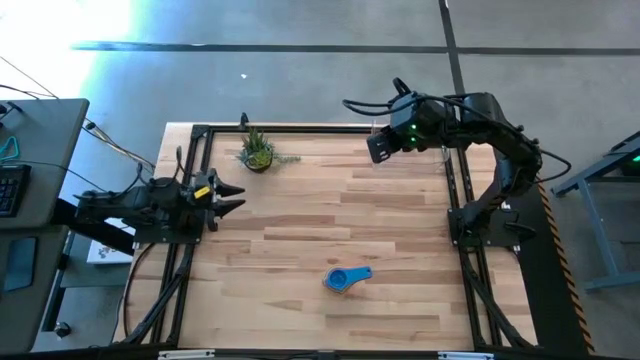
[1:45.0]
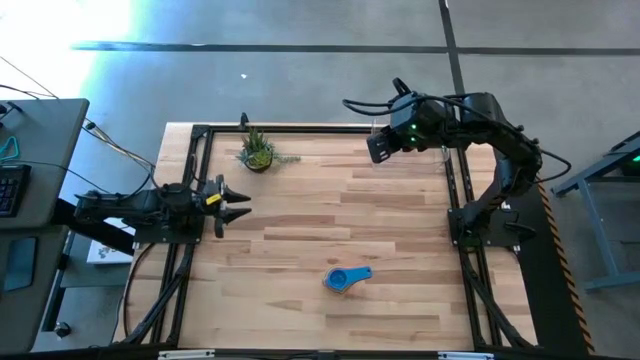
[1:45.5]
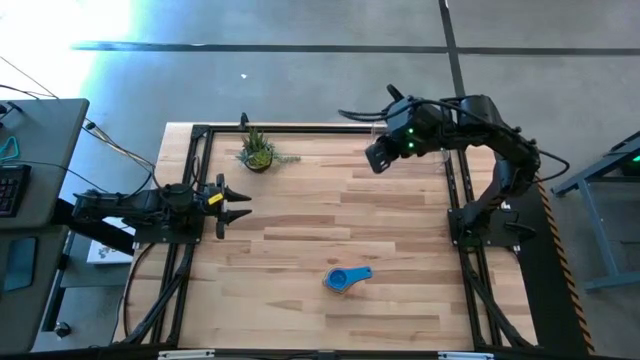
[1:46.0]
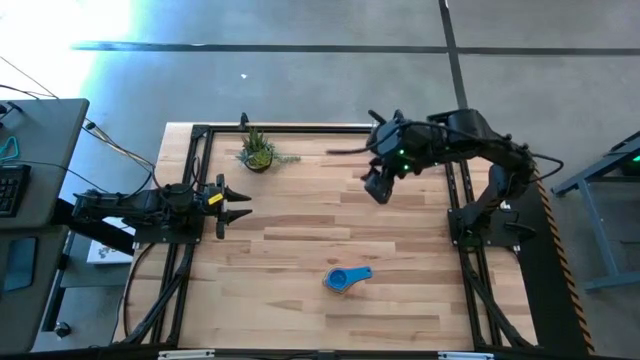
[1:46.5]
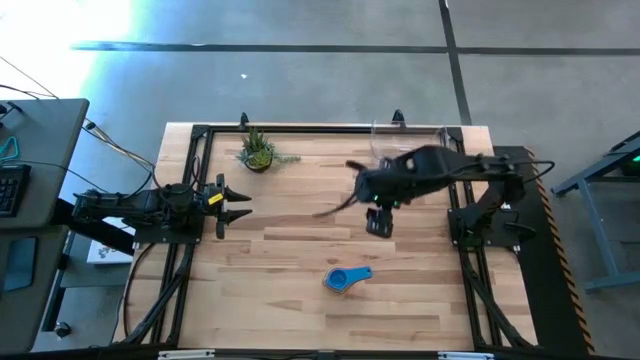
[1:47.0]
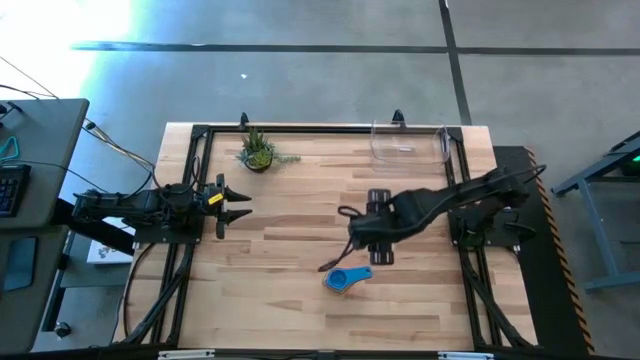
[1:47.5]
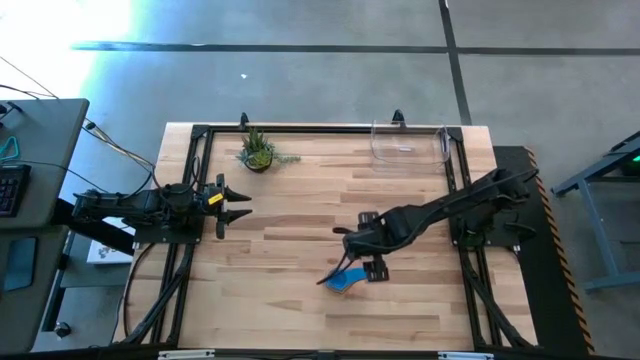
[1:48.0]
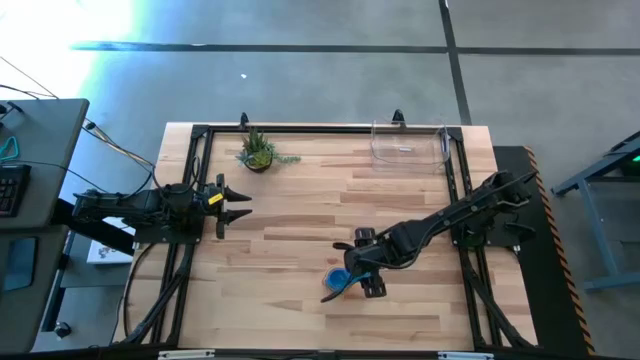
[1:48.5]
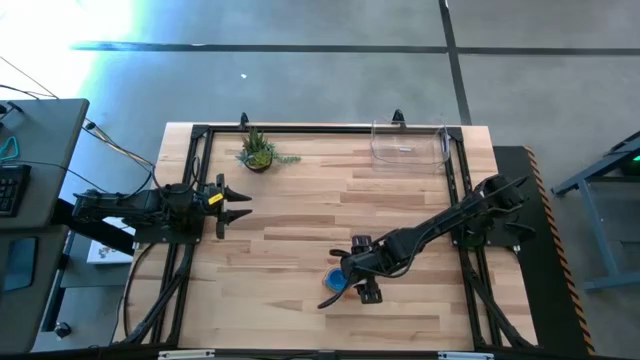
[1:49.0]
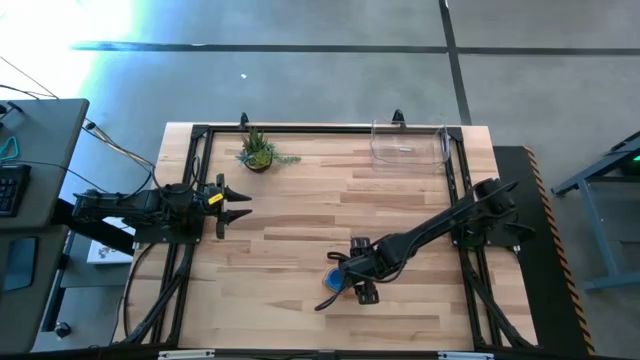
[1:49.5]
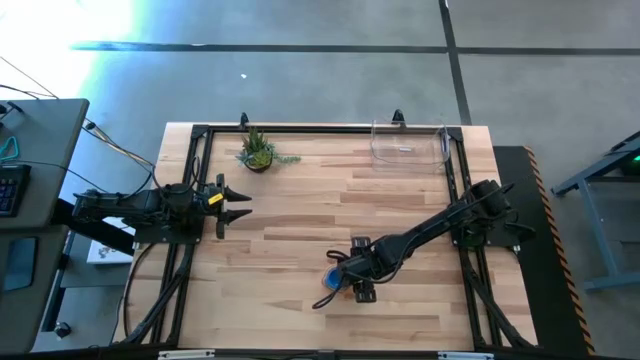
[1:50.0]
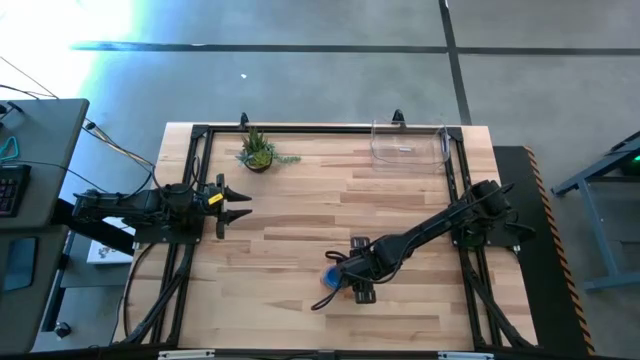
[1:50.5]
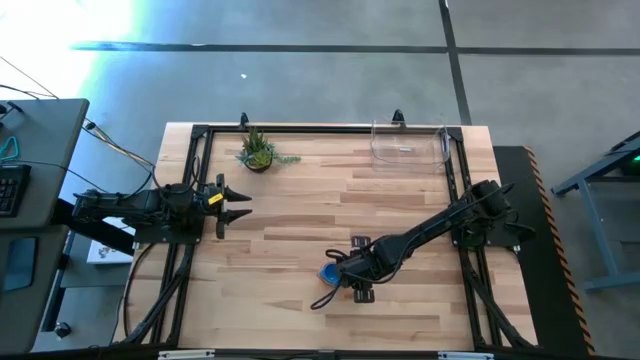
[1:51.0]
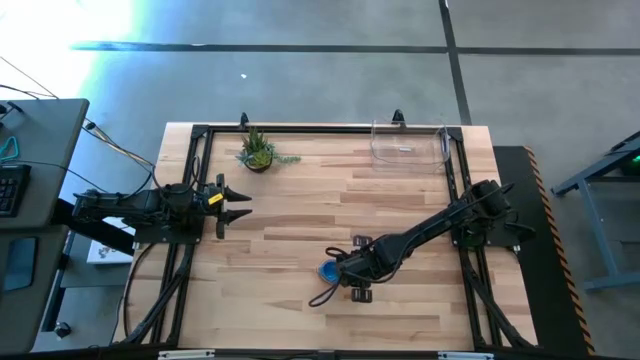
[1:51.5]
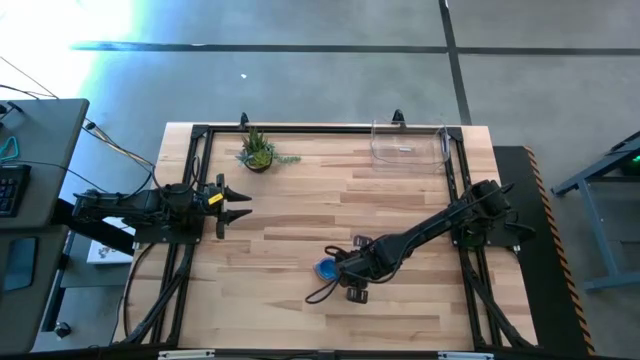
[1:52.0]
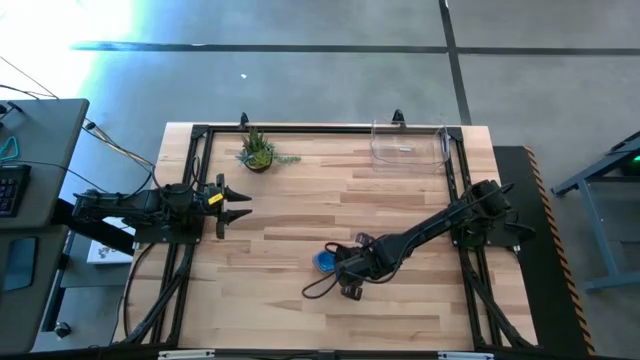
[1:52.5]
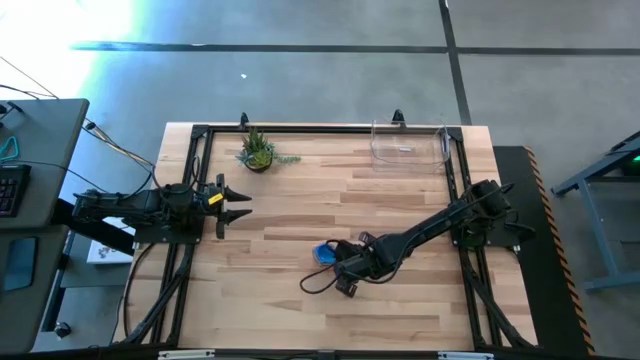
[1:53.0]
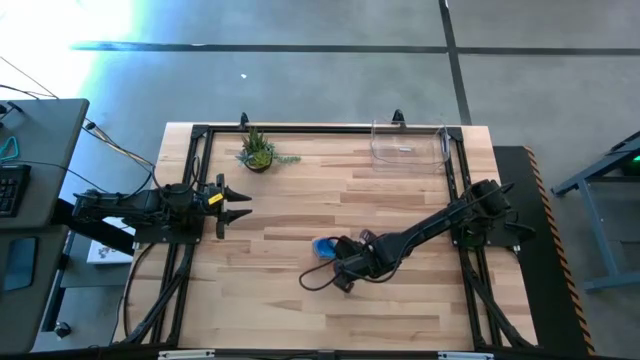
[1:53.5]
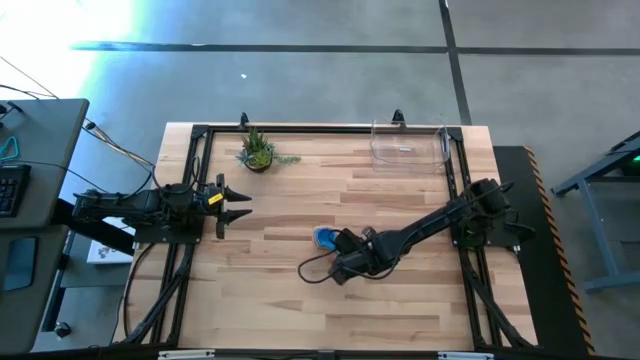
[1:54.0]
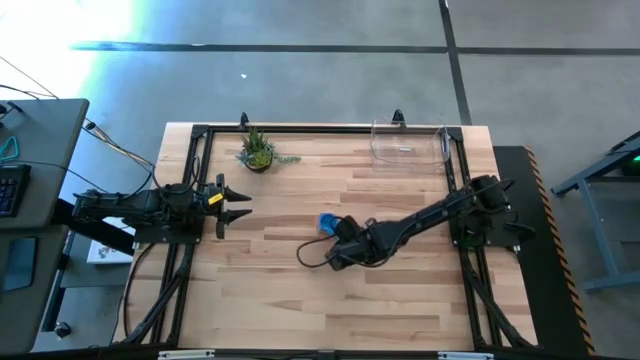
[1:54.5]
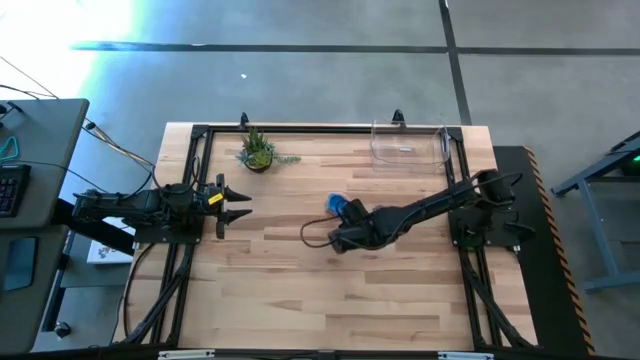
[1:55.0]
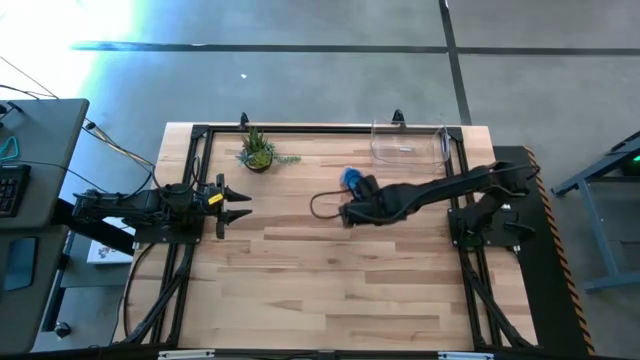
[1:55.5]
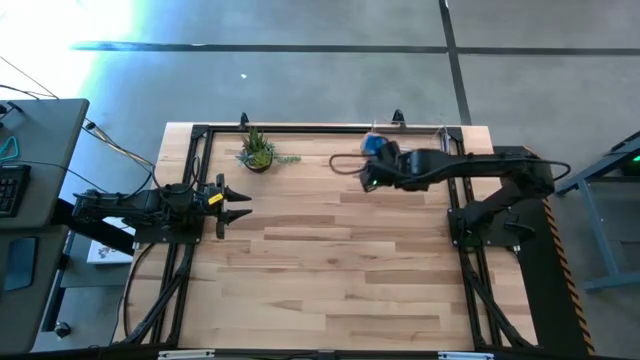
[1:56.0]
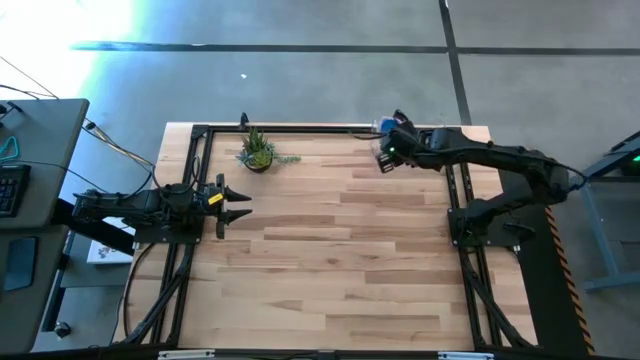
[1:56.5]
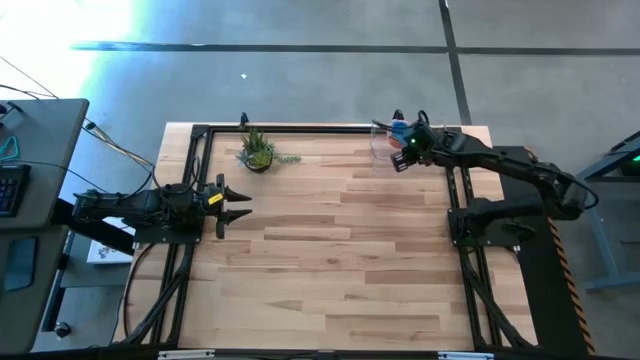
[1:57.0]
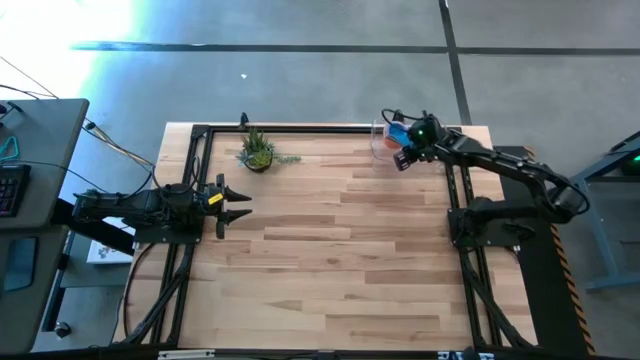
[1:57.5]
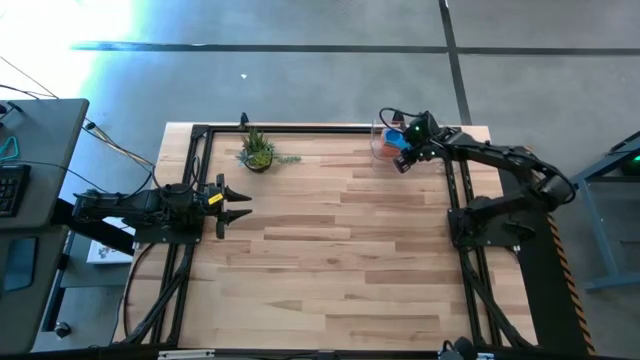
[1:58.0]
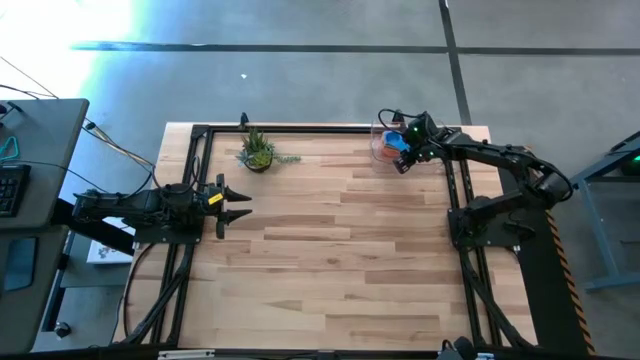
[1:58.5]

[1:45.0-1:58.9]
Task: Nest measuring cups in basket
Put the stacked measuring cups into the transparent bin

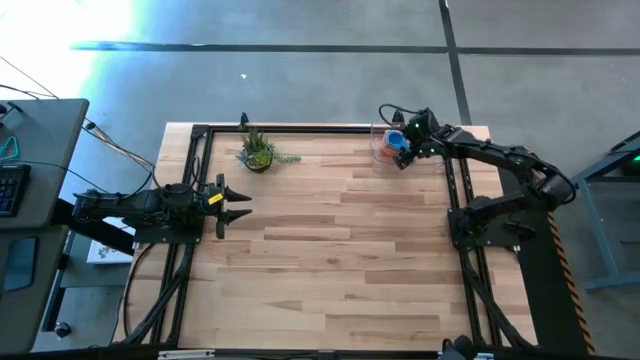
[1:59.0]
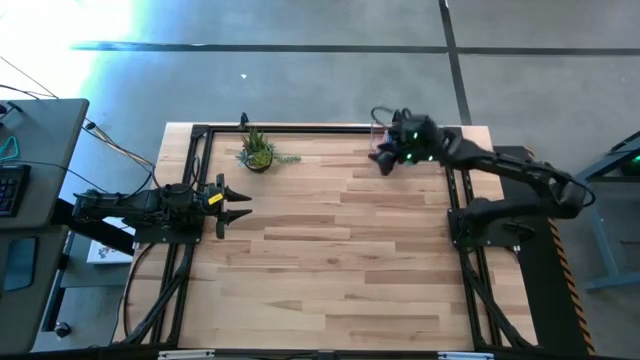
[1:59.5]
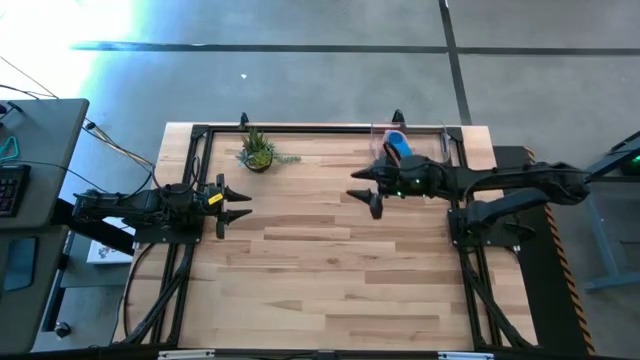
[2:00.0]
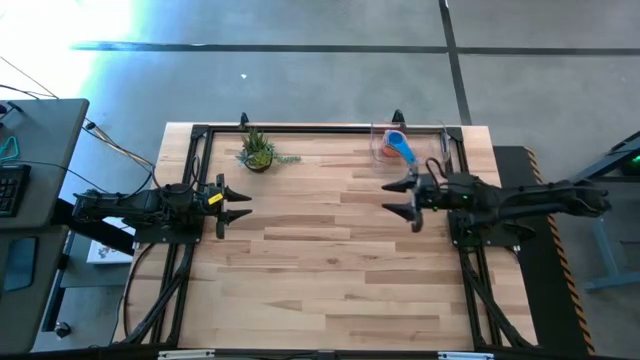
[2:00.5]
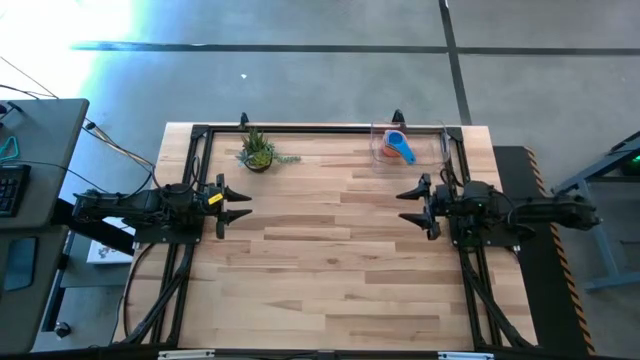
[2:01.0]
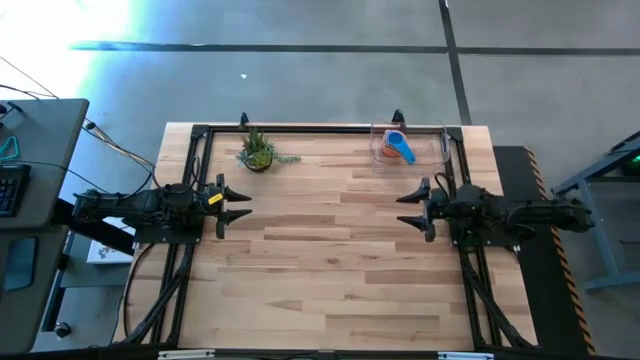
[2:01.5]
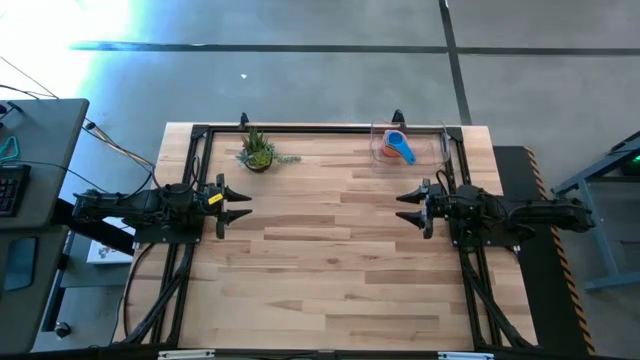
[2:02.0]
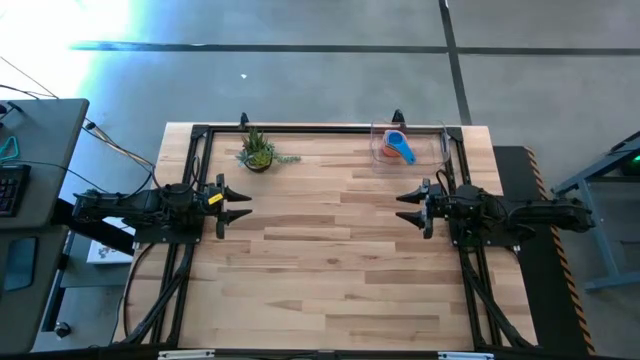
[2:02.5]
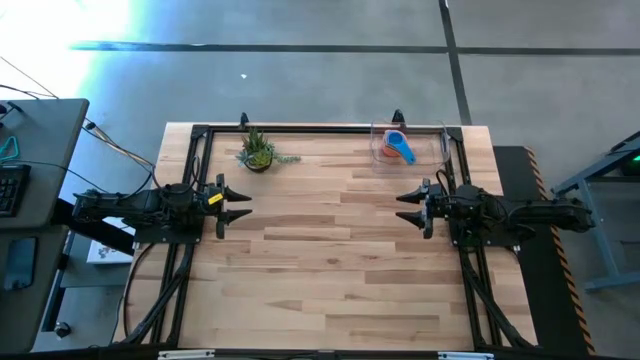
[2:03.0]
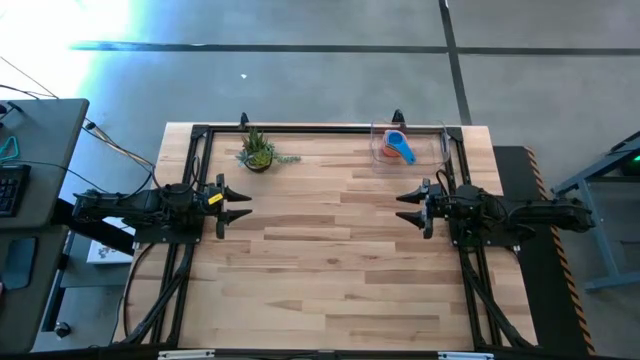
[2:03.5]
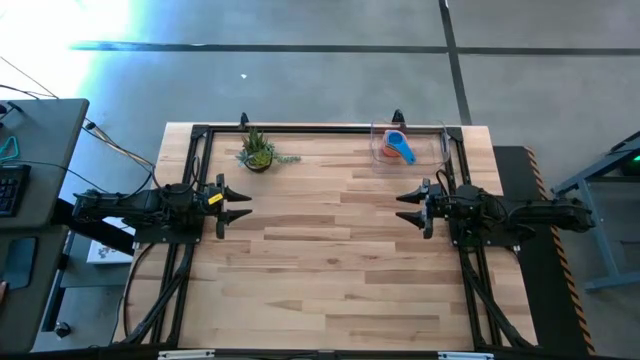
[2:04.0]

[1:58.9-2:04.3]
Return to Home Position
